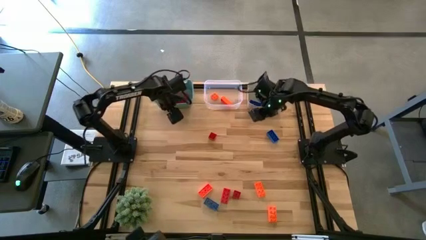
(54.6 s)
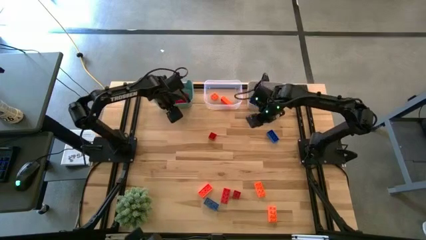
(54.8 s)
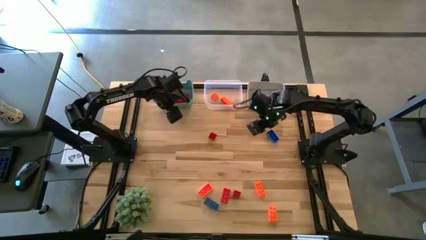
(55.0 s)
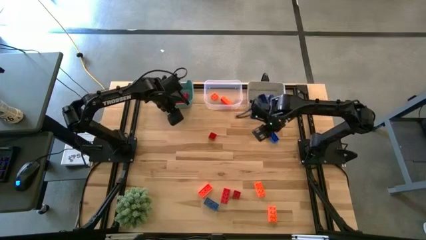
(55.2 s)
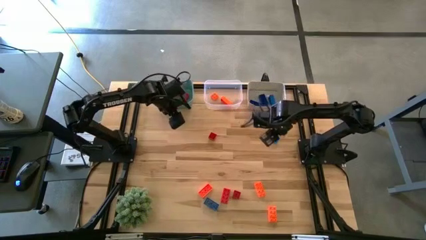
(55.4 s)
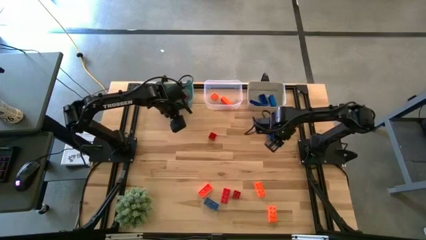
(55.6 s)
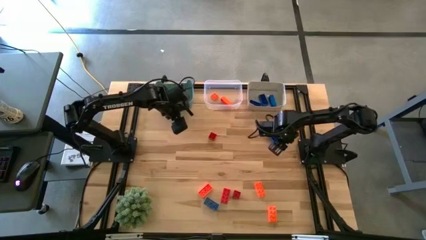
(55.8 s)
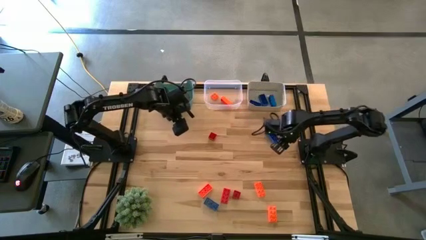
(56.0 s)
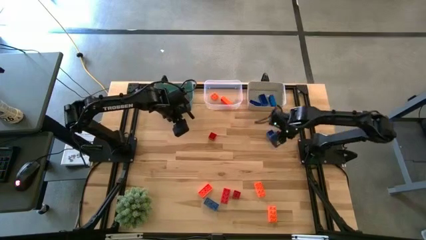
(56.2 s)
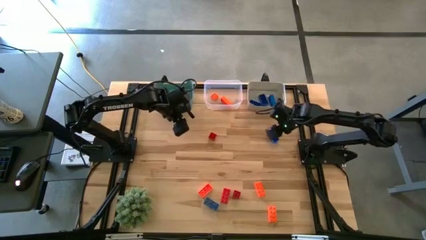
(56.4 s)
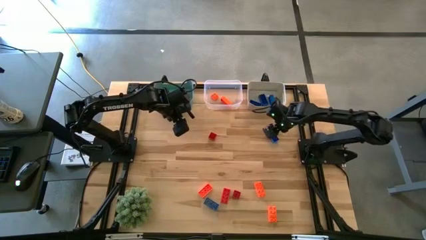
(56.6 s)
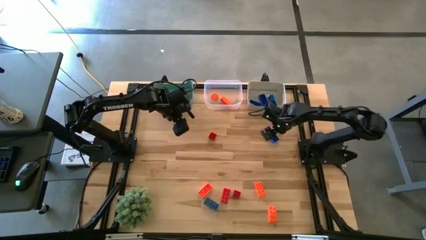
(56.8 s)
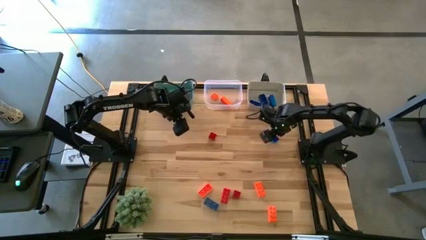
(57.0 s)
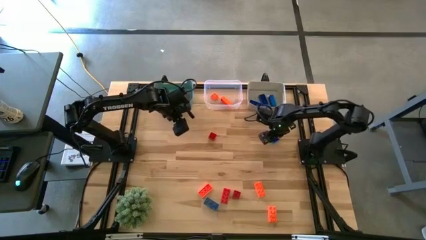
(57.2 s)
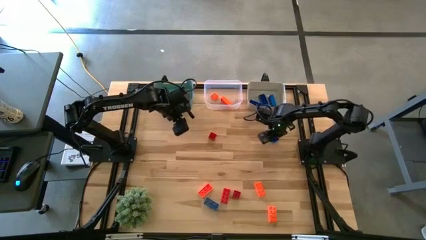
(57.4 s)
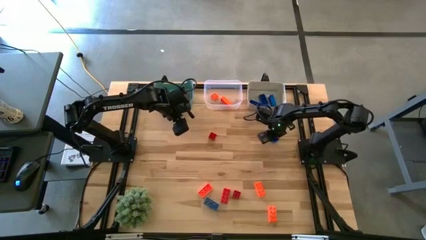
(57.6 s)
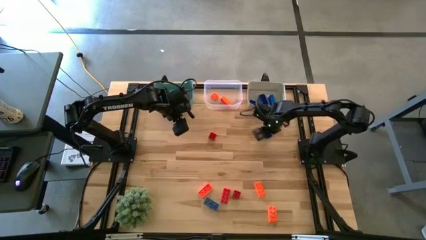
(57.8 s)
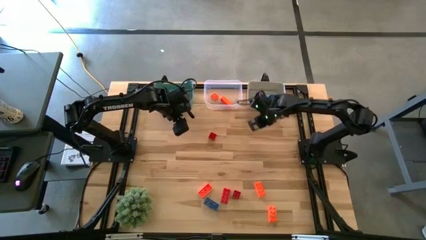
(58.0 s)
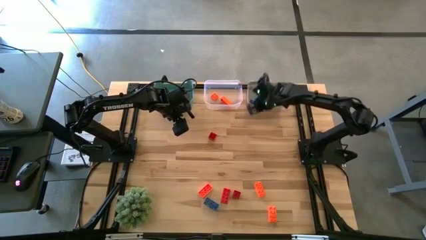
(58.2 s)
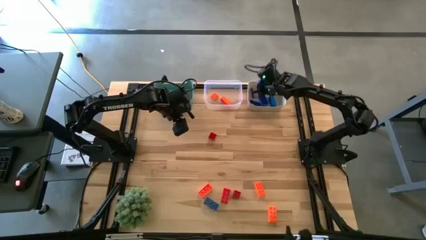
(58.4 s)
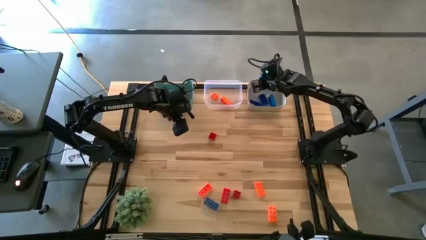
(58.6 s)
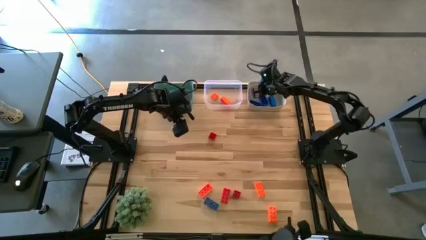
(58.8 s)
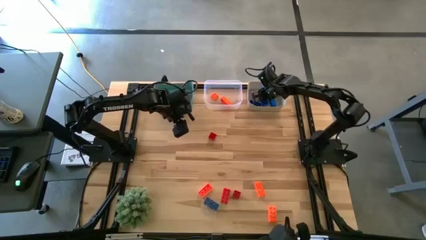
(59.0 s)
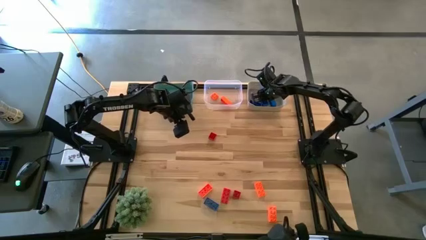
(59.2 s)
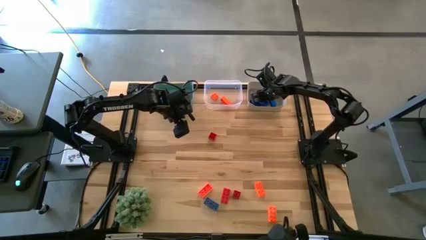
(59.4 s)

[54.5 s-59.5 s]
Task: Sort & place blocks by color
Put the blue game piece into the white bin

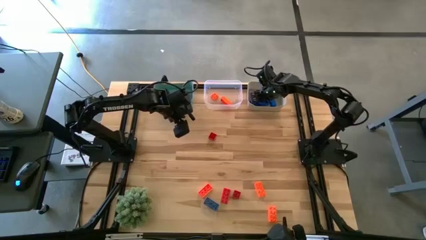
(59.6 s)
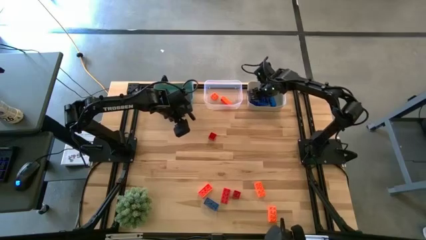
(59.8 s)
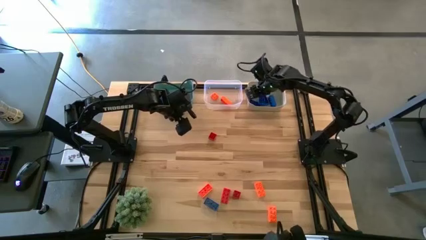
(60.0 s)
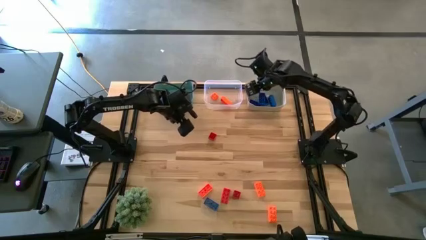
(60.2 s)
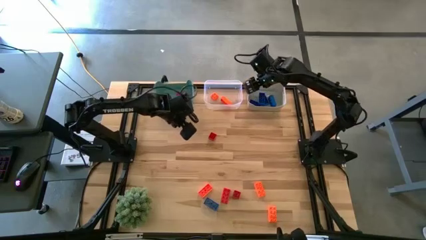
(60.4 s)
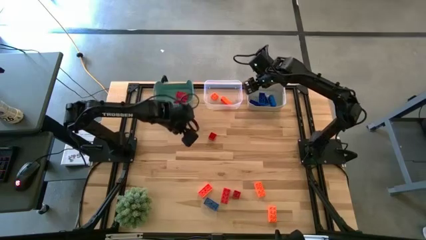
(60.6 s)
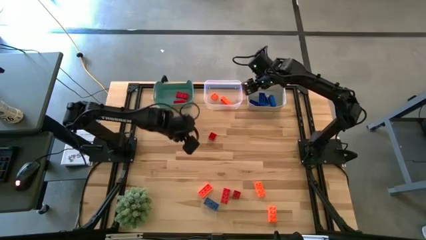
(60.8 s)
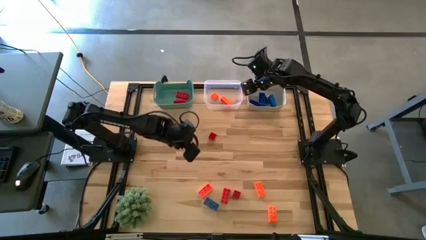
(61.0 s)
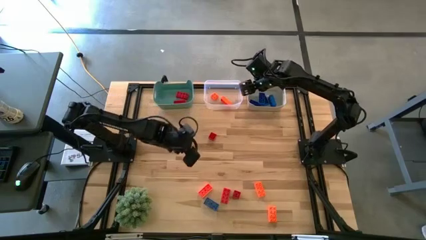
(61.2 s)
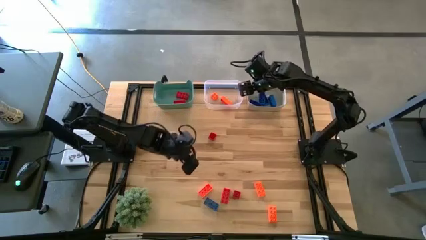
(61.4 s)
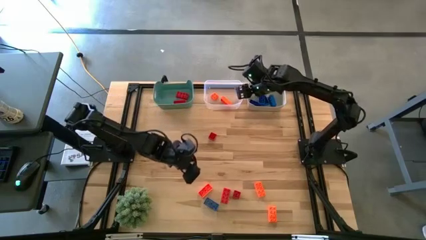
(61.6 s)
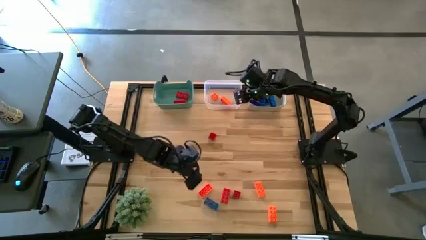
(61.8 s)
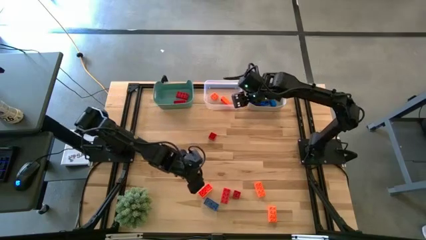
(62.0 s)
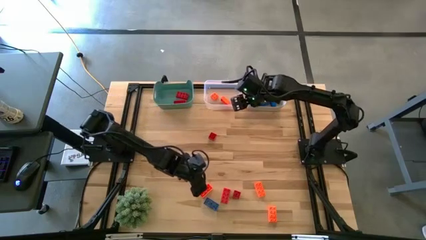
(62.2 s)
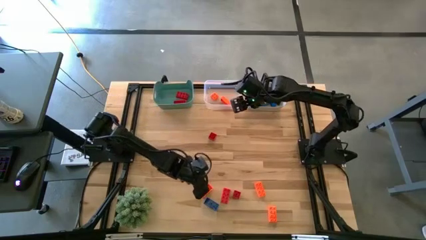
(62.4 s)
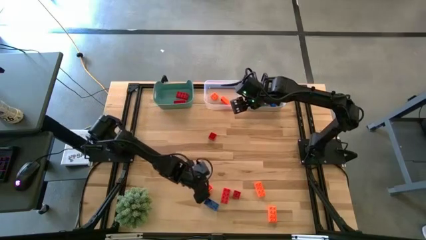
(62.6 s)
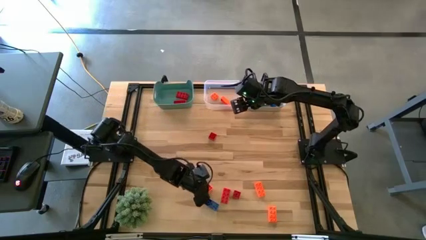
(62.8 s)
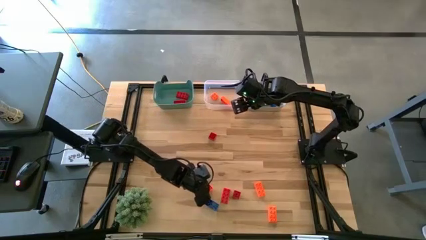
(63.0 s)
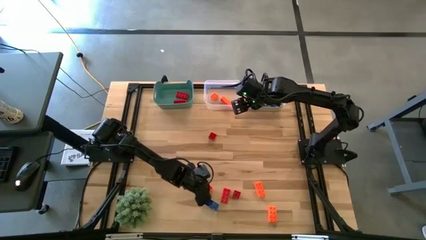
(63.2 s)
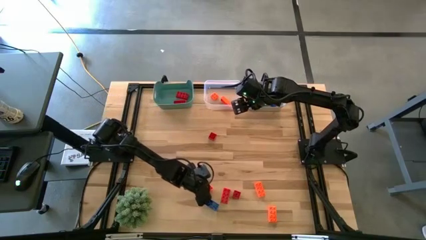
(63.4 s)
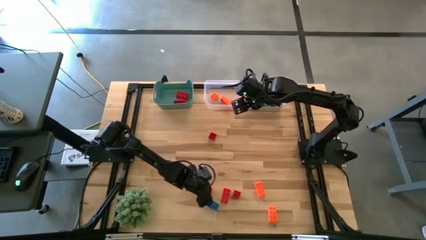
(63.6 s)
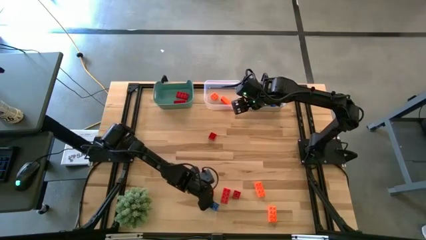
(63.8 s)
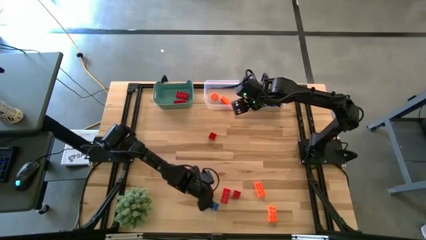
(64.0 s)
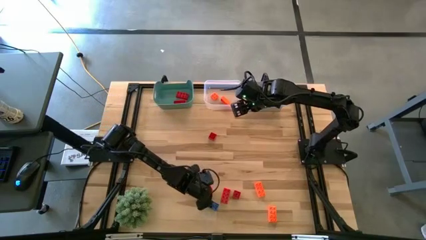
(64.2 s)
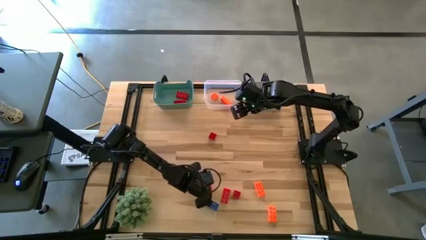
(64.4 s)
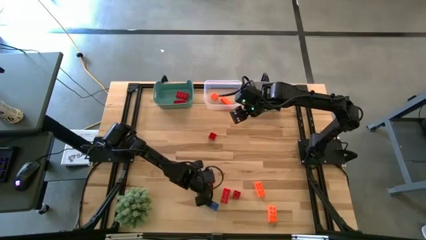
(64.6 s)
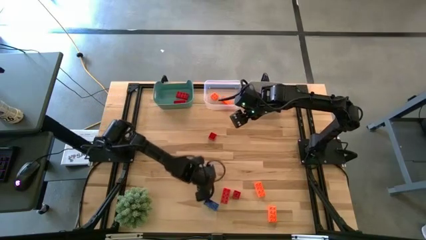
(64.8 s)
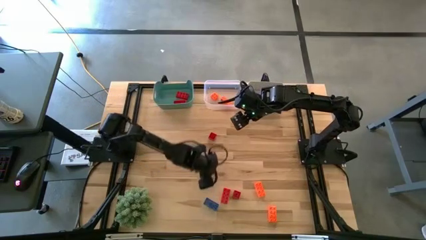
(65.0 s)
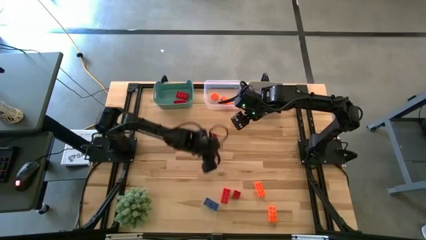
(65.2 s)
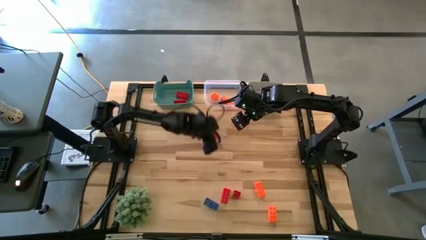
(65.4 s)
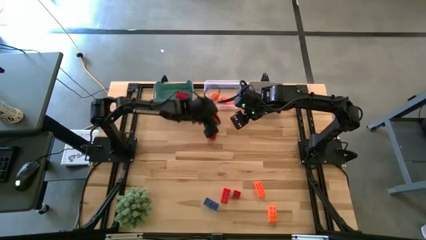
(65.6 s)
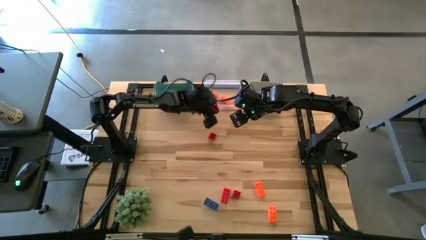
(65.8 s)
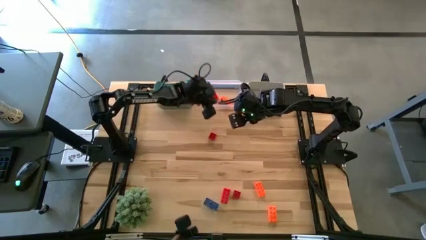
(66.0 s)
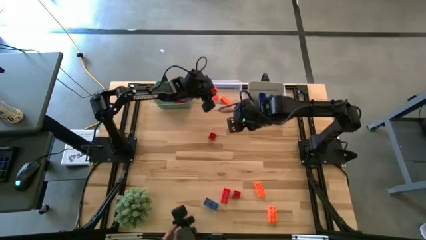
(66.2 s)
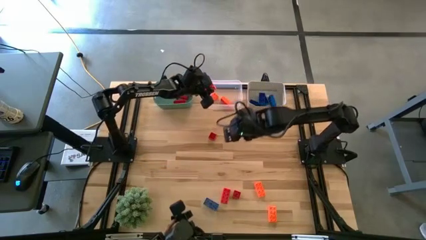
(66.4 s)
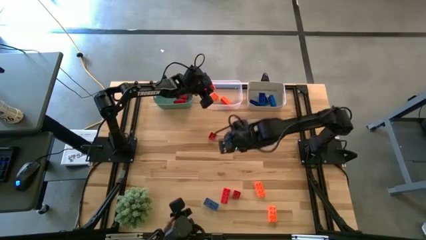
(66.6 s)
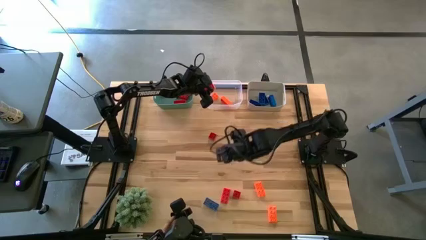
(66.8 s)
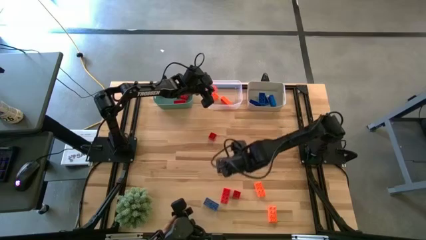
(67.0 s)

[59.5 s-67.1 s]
Put the orange game piece into the transparent bin

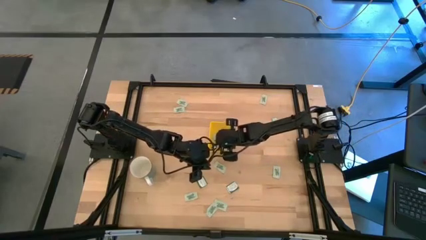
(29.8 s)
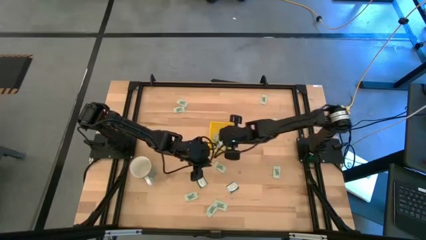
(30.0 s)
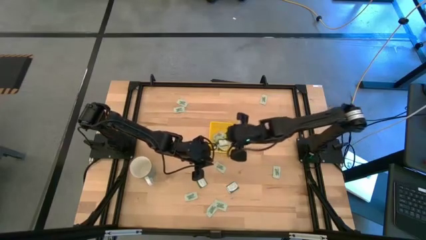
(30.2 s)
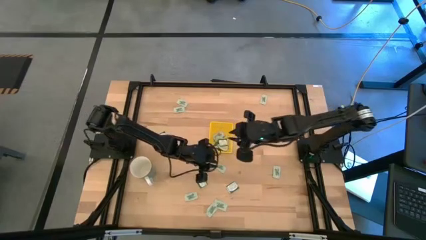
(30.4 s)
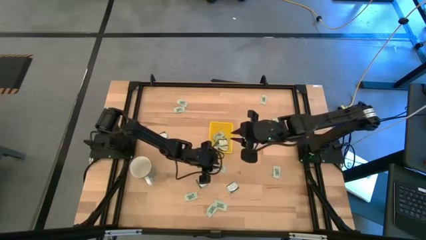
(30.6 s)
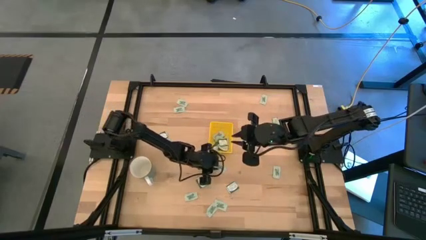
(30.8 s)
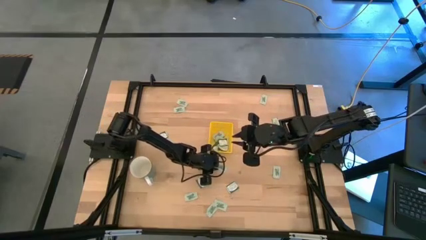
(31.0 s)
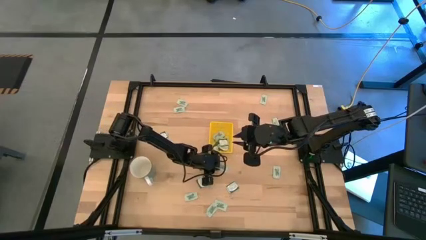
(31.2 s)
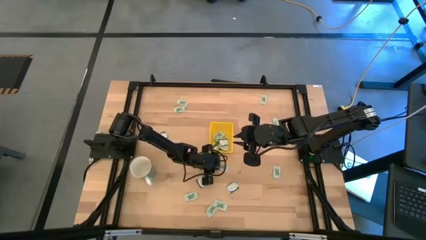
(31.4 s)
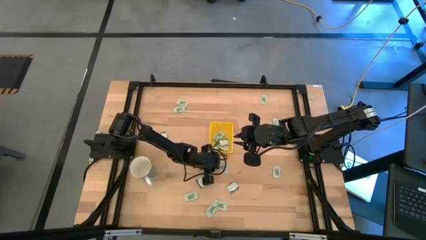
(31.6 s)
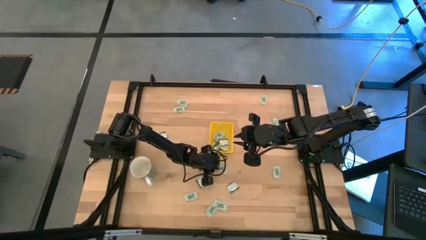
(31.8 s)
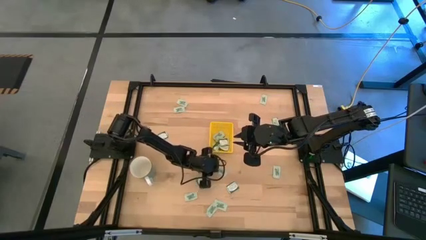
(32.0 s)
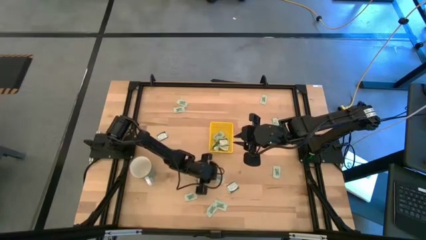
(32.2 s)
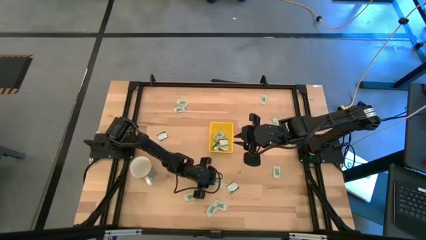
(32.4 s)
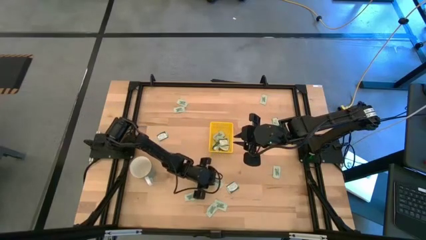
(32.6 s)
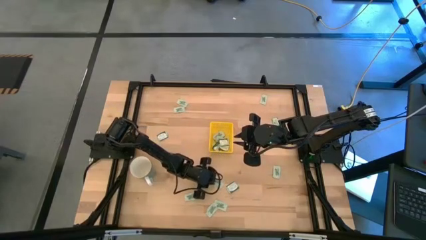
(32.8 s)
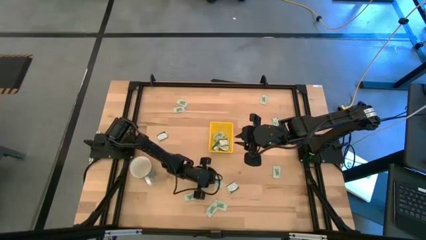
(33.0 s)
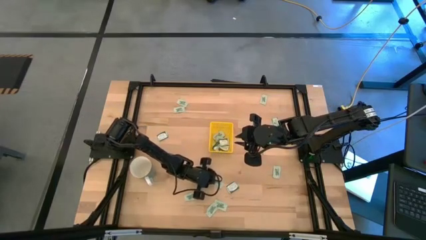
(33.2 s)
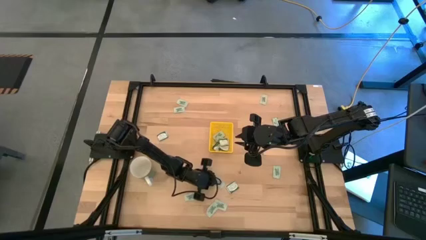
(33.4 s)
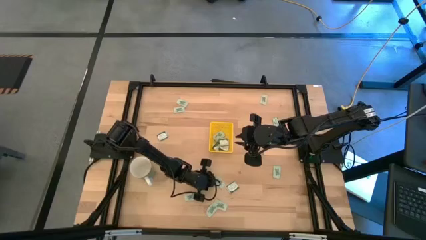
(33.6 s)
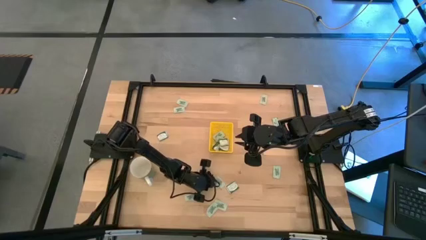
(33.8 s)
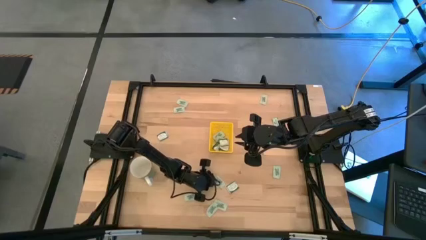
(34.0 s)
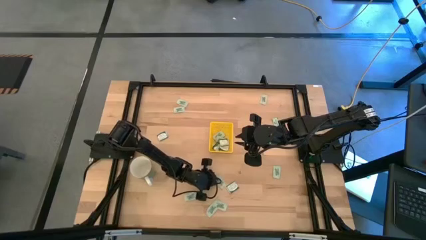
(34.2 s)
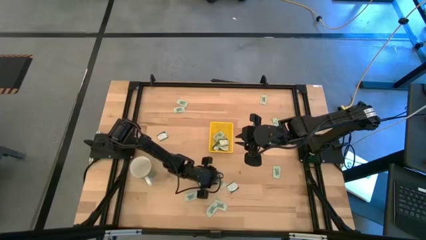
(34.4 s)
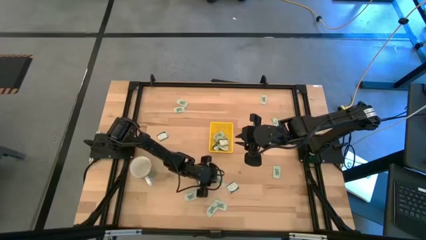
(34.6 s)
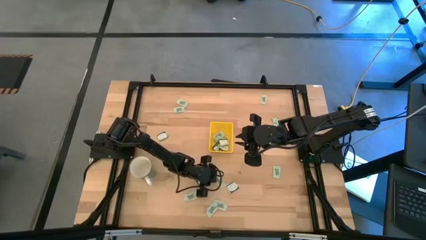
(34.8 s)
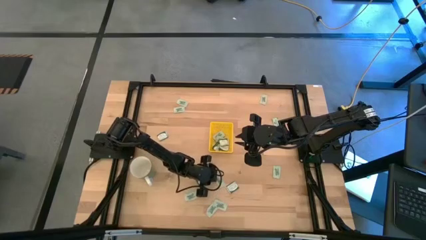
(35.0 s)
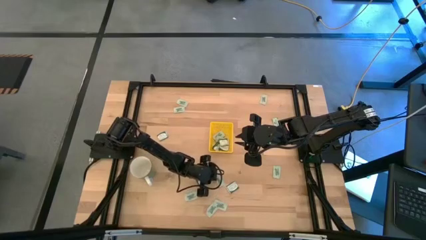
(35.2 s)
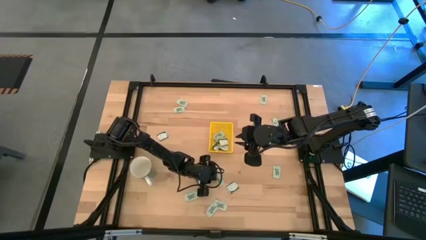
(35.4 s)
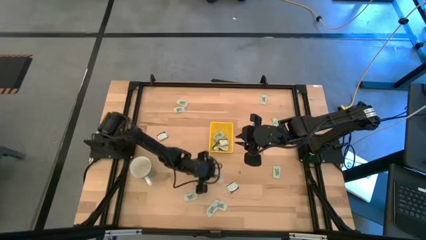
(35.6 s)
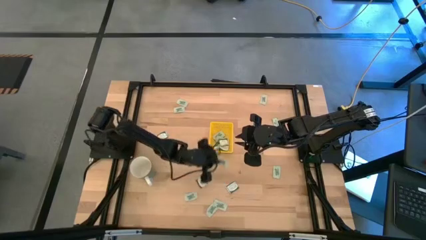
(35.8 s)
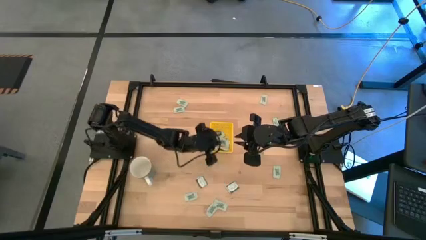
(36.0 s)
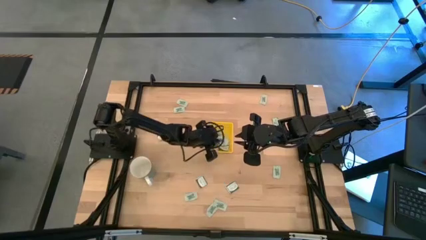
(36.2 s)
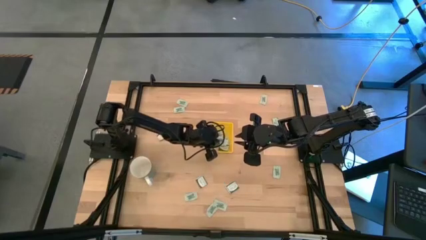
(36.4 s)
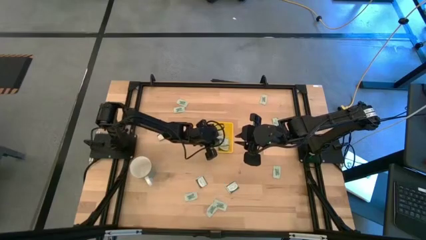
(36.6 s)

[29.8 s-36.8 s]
Task: Pick and place Stevia / Truvia into bins
Put the white stevia packet into the yellow bin
